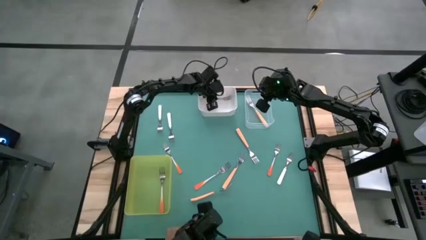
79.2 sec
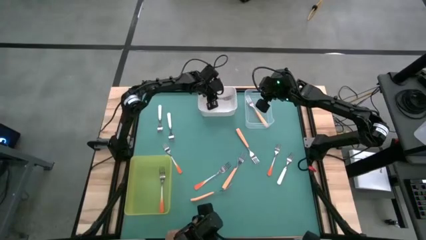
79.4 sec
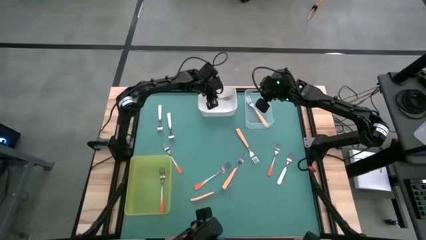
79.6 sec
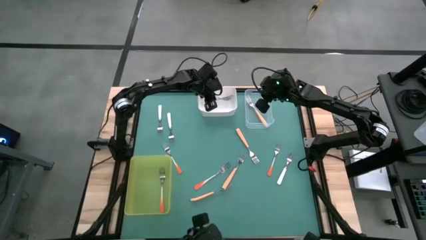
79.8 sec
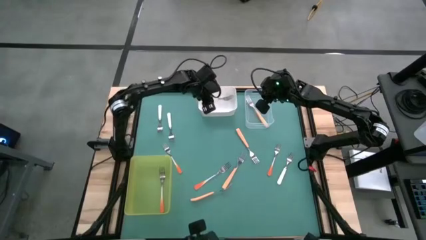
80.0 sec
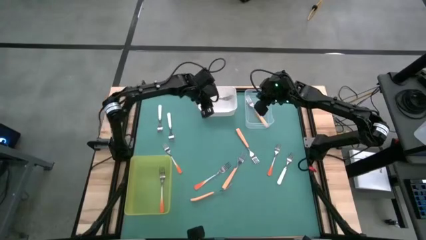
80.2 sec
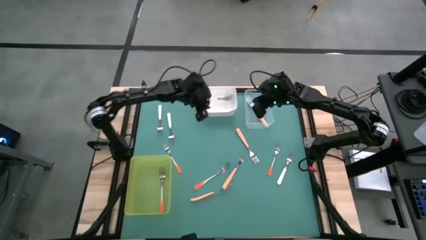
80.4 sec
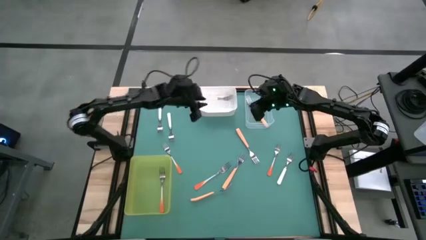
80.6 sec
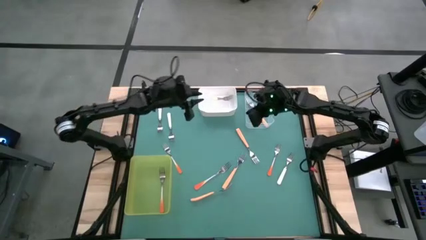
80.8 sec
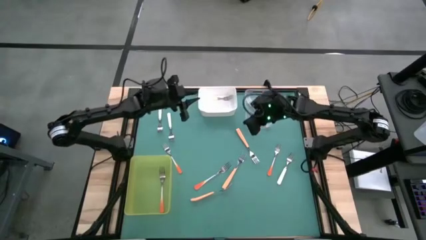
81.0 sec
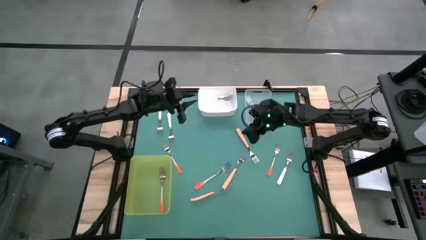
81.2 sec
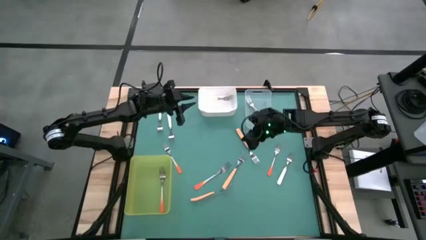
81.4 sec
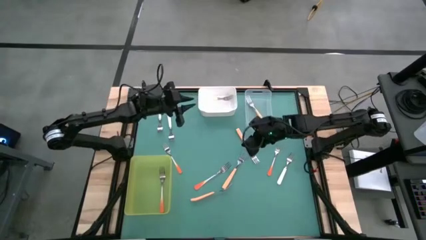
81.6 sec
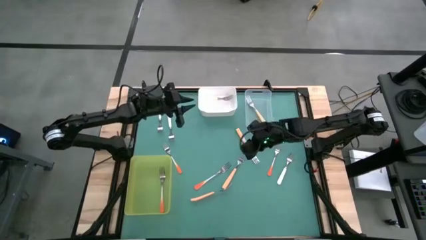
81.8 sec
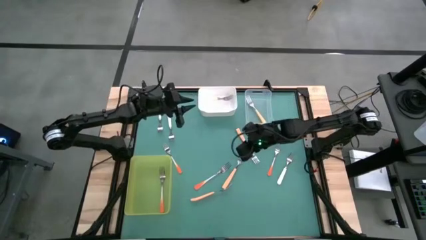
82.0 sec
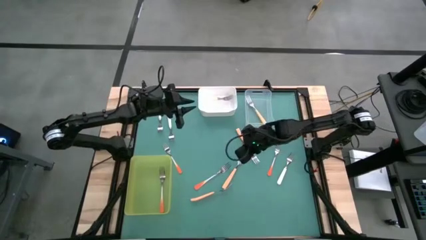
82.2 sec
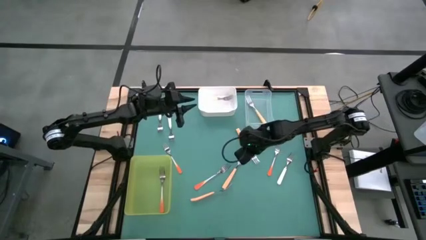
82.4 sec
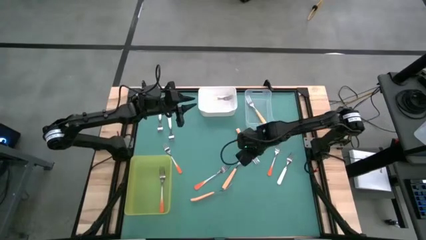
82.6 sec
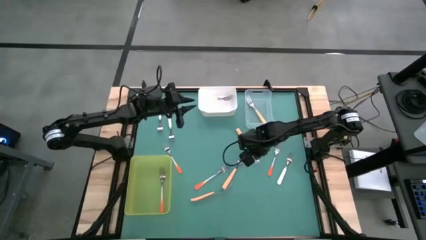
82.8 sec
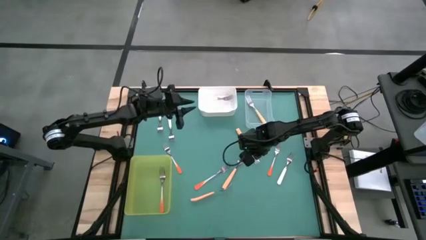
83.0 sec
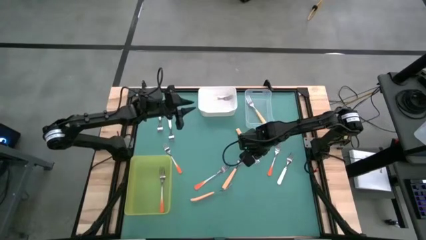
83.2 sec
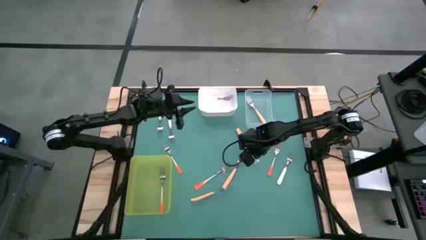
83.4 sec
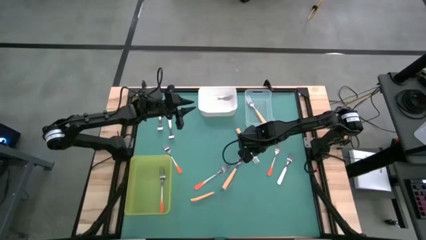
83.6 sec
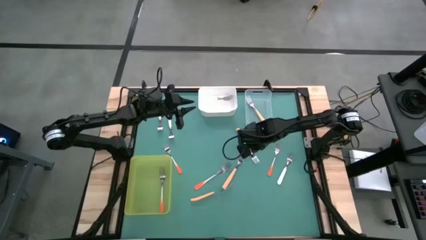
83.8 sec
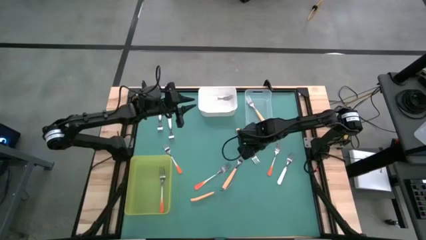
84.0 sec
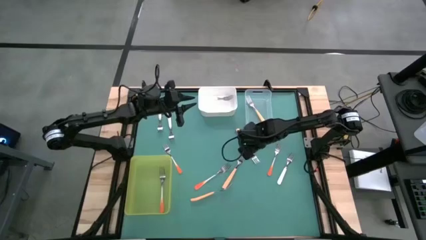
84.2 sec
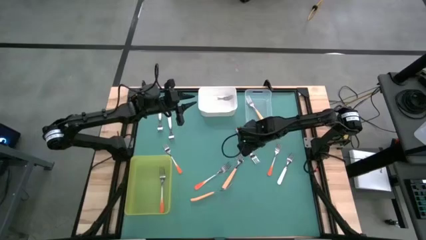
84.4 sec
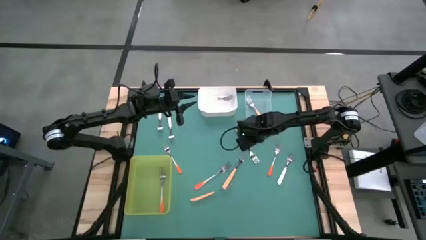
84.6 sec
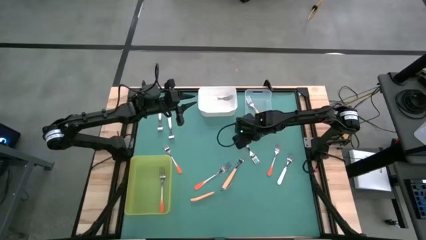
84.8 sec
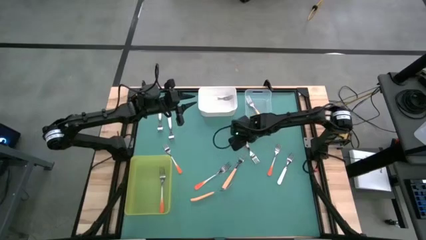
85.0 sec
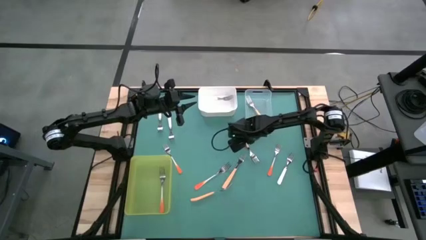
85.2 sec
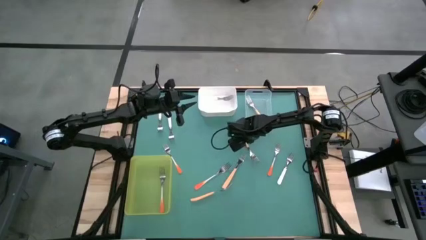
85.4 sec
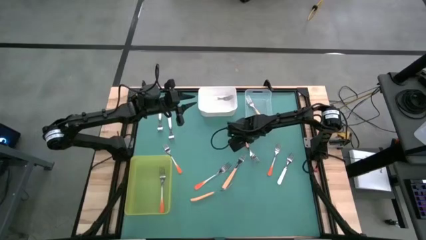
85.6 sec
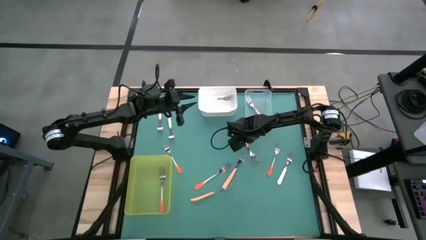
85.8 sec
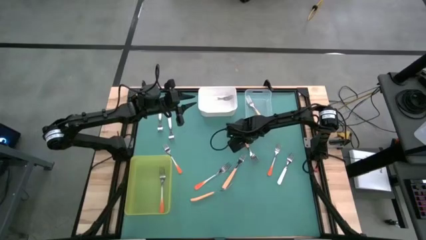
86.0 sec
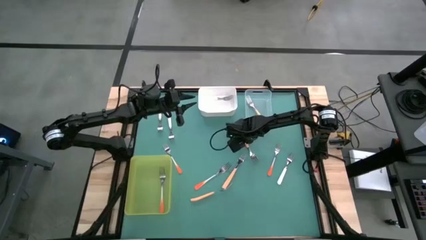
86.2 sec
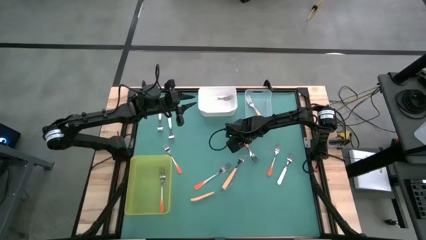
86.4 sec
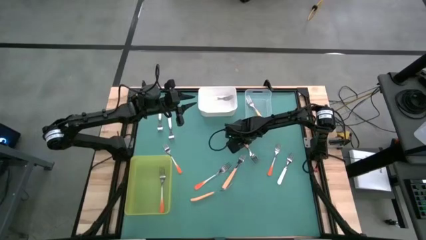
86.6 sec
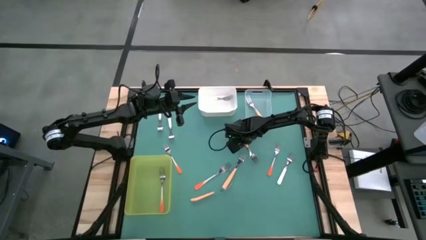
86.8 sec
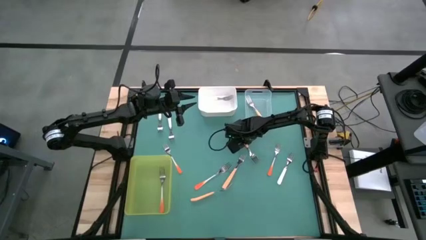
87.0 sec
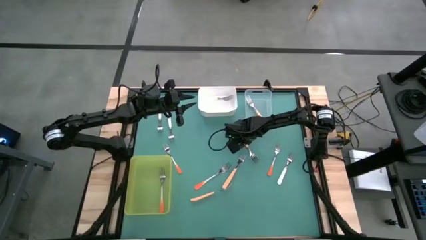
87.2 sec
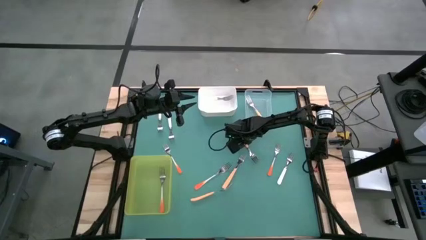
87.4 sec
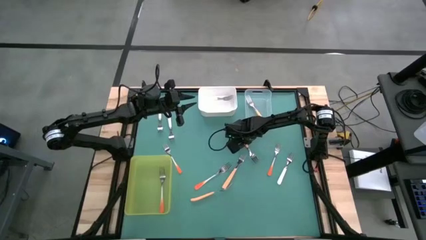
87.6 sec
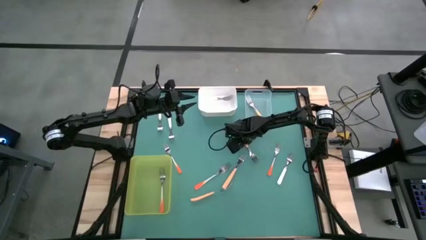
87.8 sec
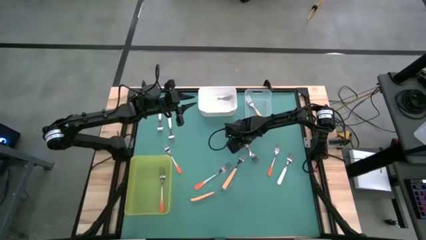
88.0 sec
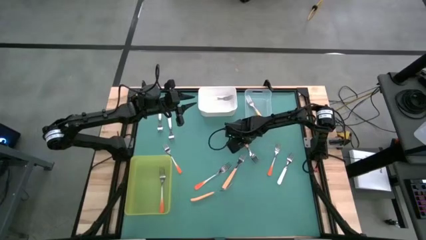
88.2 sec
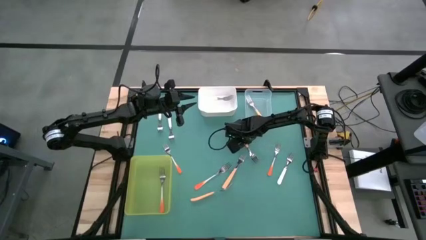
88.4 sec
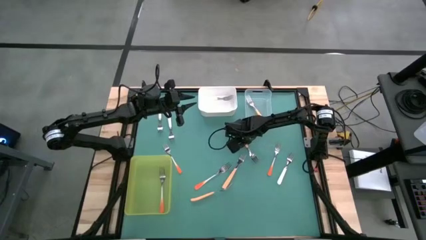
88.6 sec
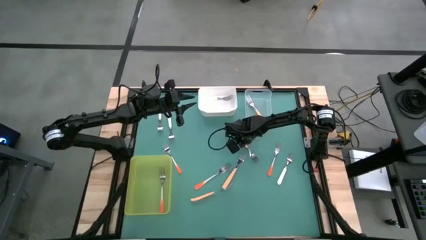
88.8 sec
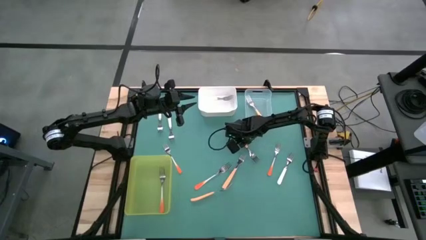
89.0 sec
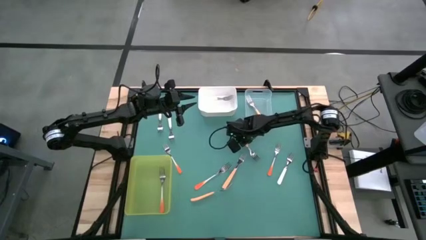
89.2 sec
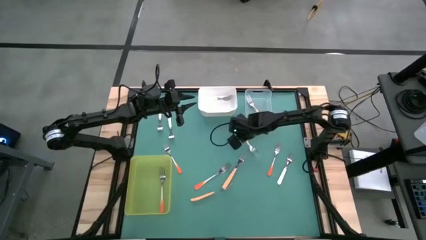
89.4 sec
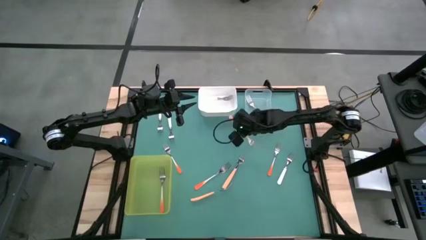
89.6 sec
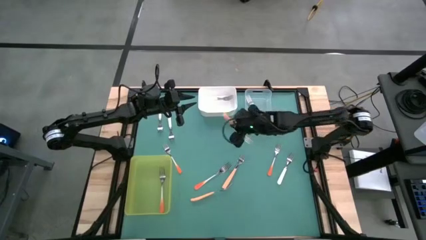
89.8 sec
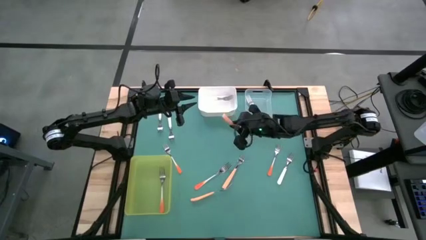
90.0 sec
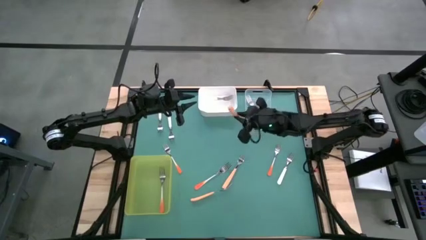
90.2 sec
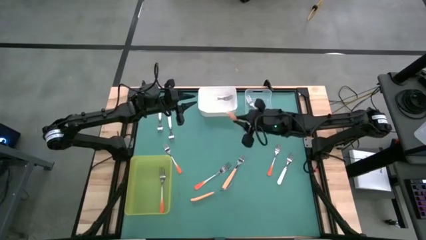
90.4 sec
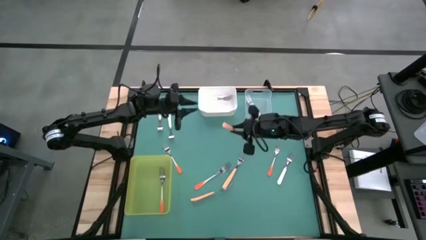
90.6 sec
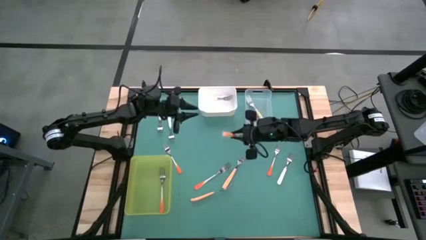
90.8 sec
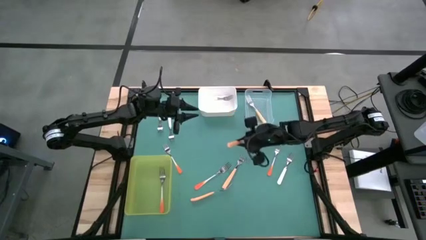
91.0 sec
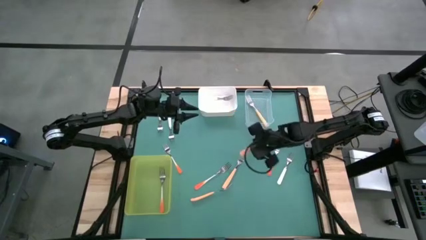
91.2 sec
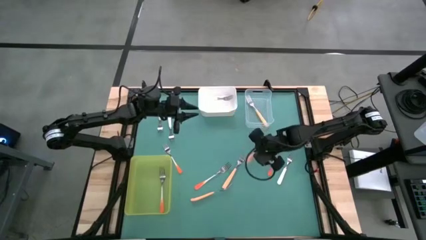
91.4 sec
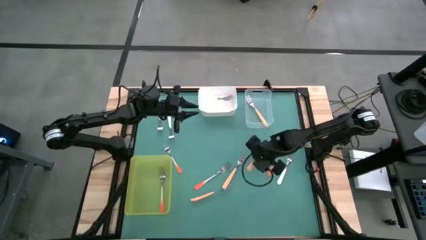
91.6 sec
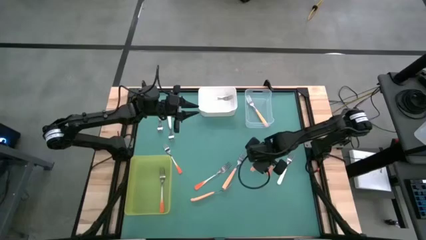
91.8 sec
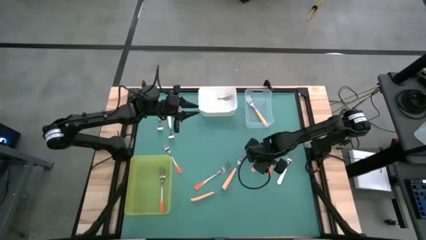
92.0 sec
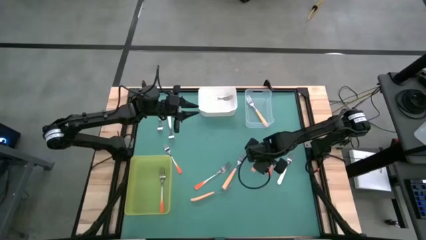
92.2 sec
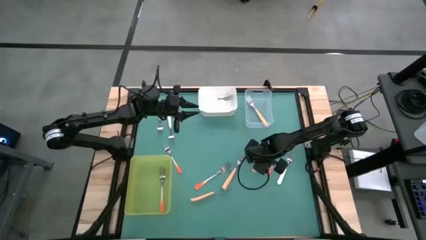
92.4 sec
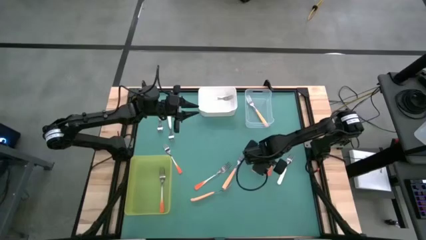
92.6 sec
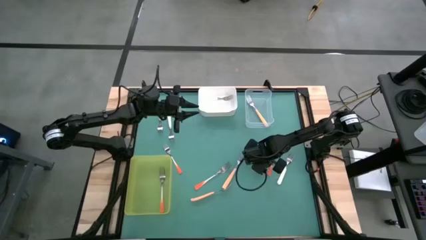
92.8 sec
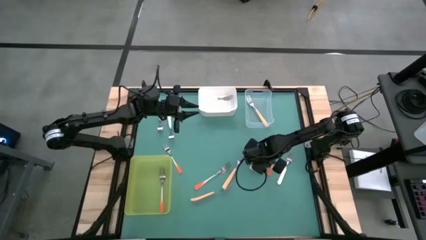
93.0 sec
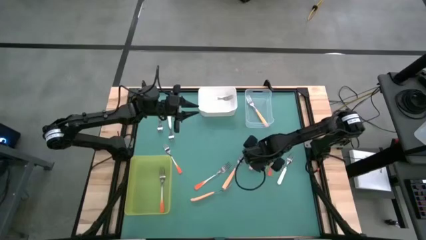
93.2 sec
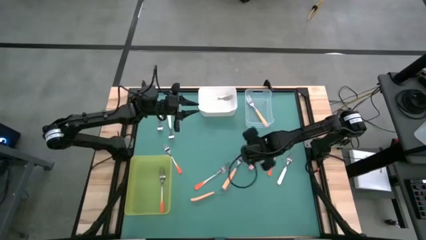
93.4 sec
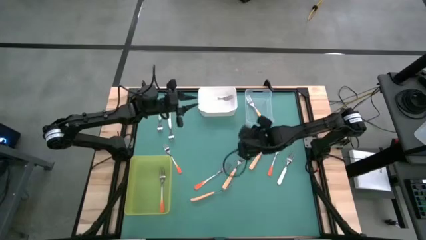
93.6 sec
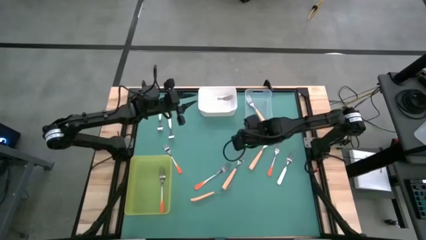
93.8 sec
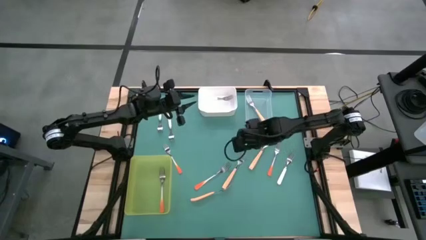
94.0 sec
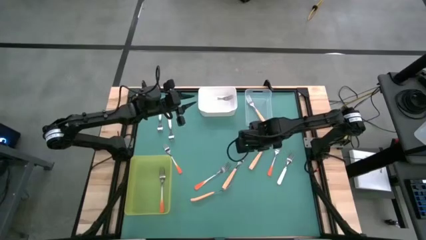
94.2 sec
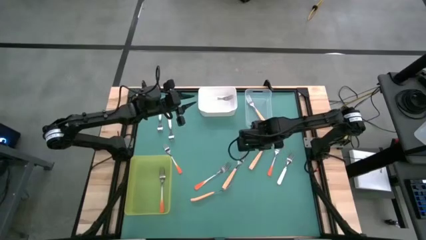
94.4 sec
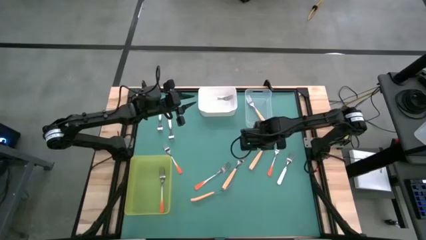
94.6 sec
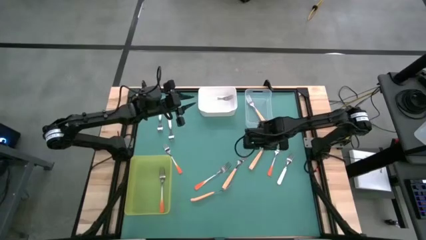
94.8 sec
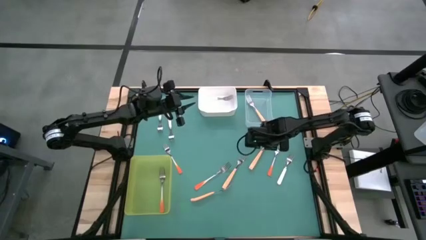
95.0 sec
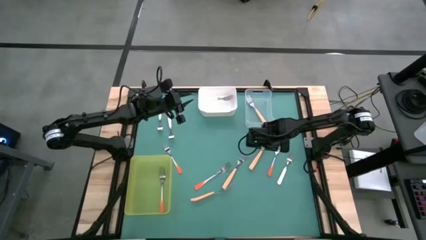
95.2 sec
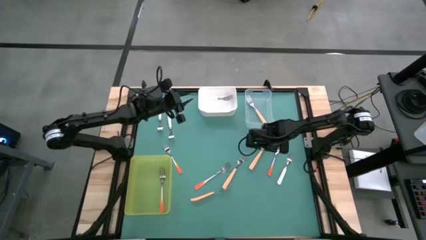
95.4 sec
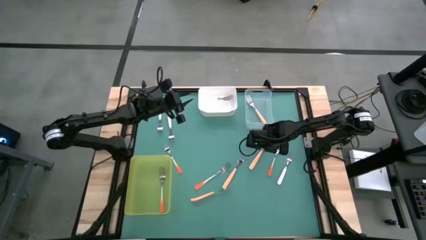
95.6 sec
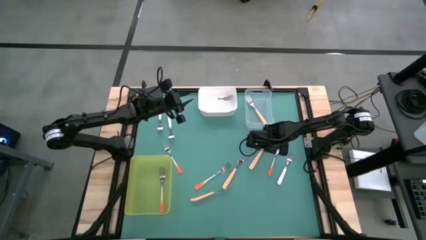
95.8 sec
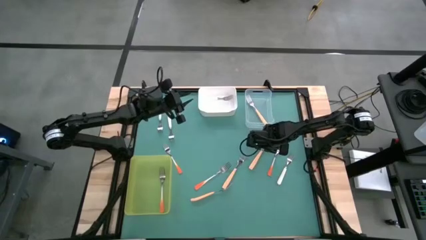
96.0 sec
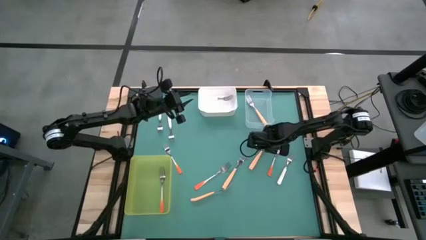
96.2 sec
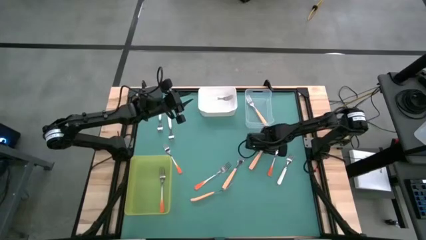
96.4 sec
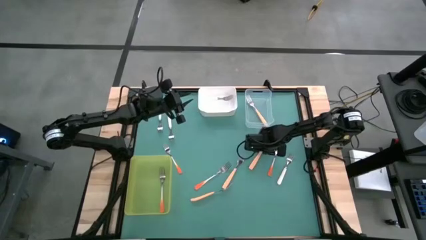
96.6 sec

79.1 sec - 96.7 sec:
Task: Sort silverware by color (type)
Put the light orange fork into the transparent bin
